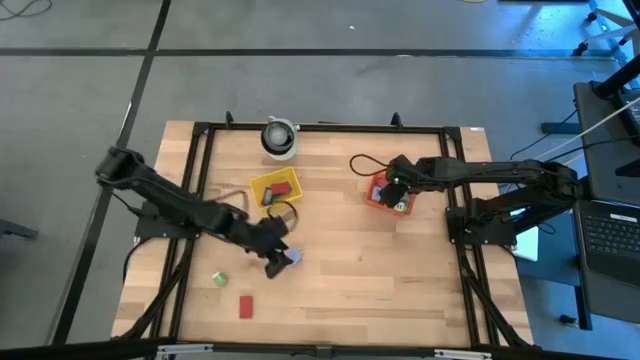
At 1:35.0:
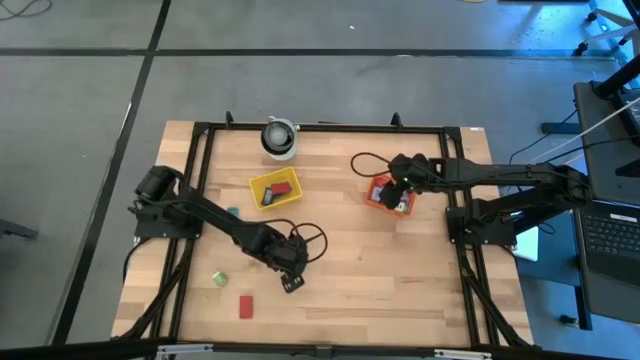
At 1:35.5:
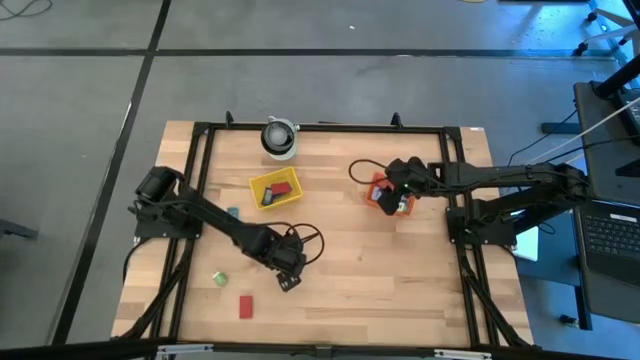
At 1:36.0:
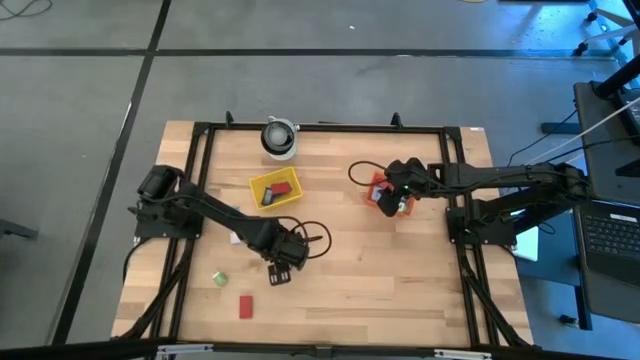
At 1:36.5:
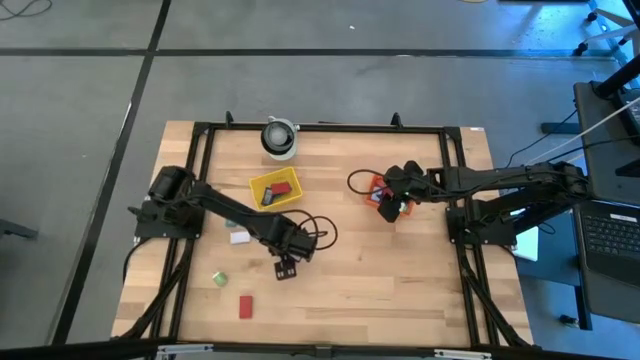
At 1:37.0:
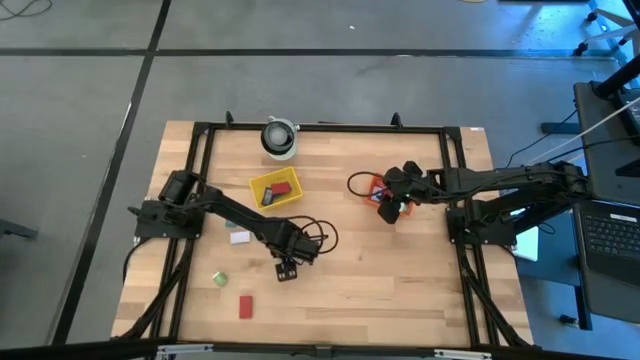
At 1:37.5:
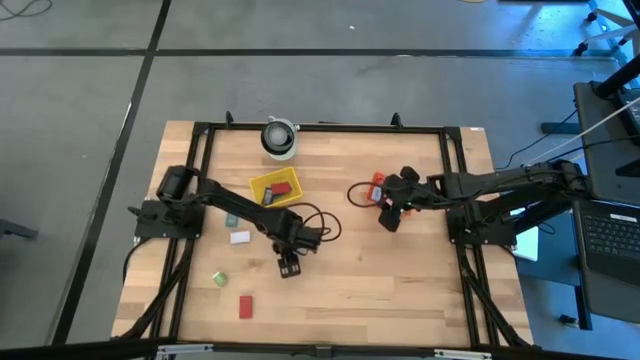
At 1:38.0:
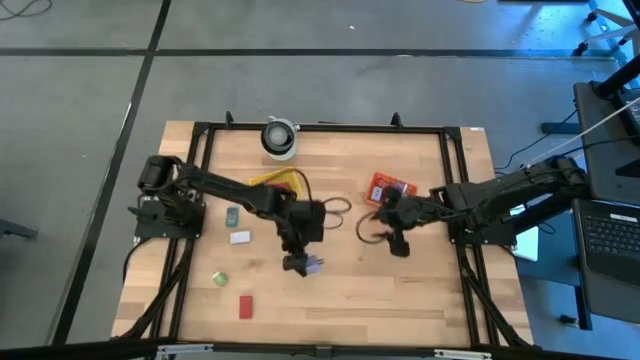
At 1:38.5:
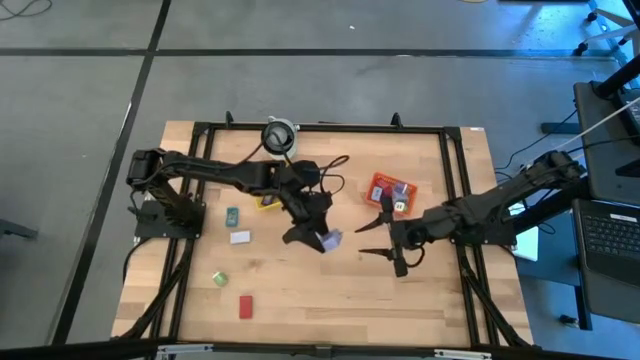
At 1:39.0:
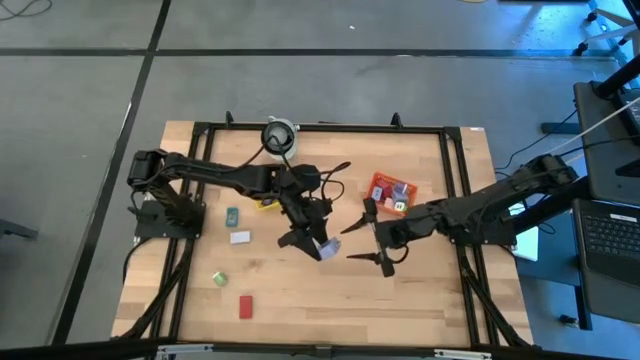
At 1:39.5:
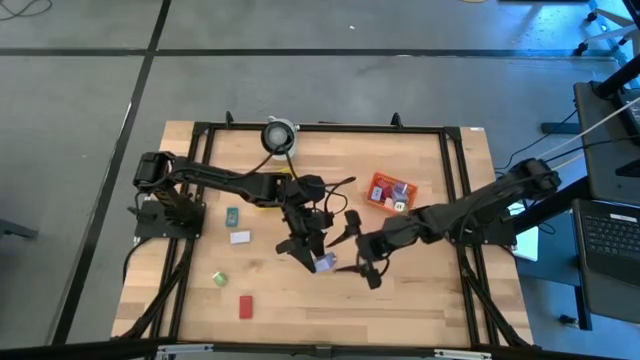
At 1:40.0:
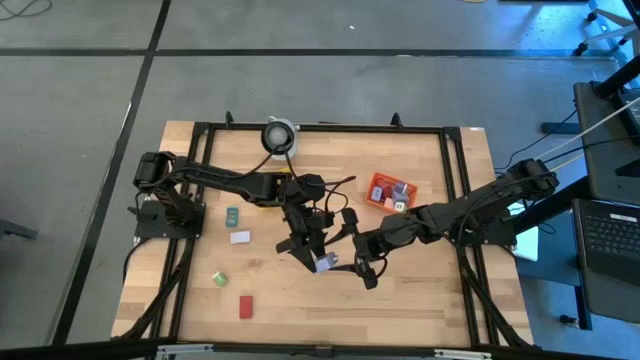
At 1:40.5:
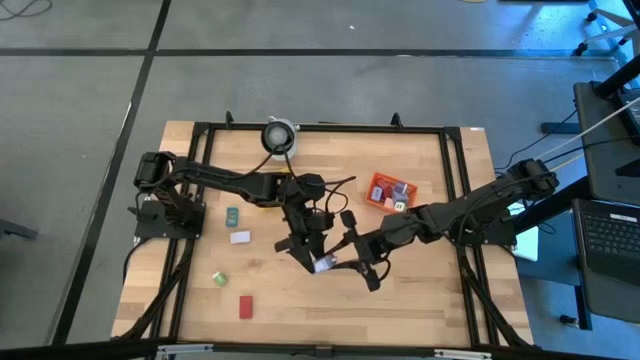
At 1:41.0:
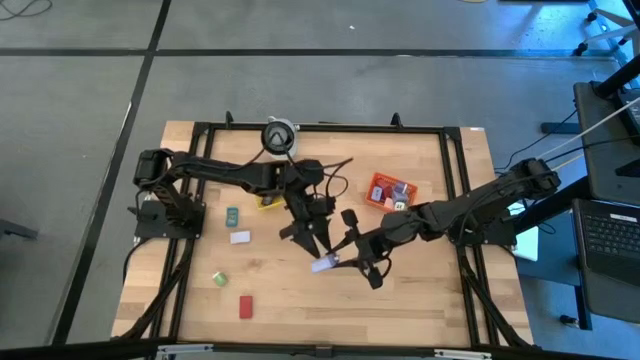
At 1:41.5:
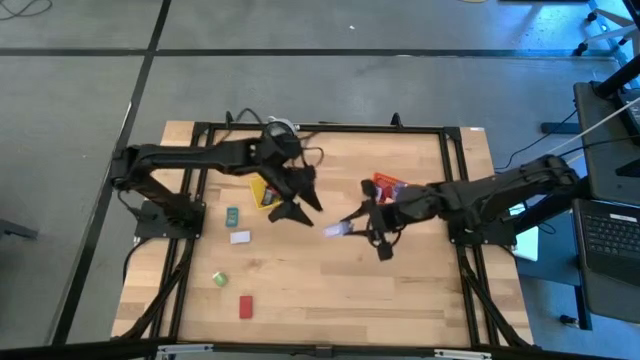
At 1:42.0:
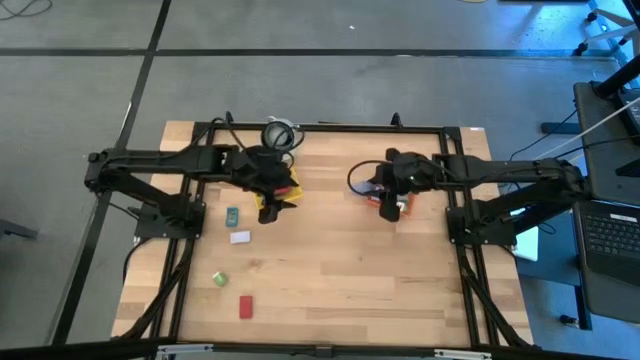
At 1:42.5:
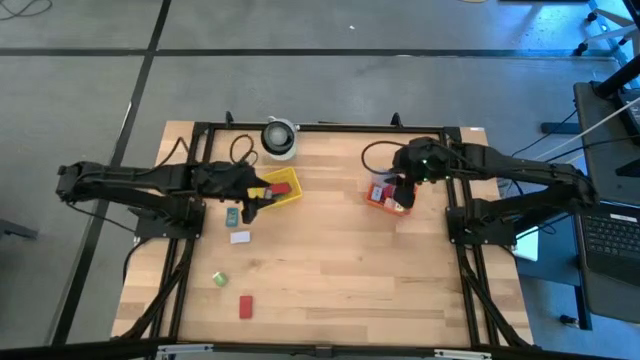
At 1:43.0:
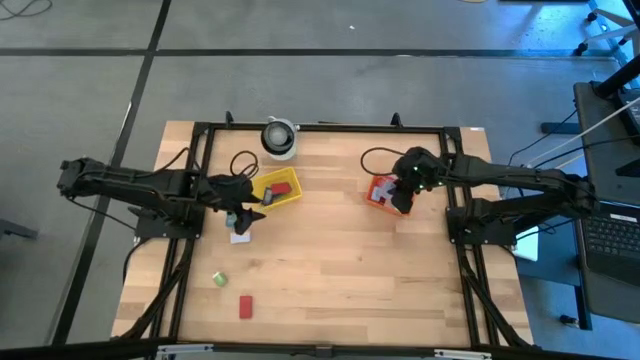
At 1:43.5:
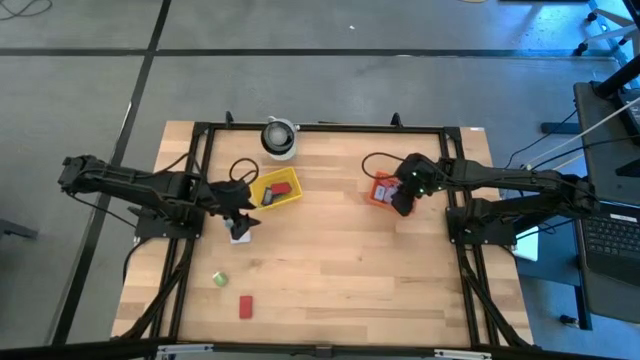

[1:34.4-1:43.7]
Task: Pick & Place Office items
Put the light blue charger adapter into the orange bin

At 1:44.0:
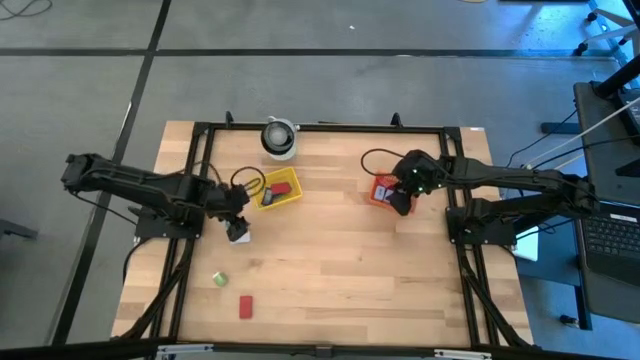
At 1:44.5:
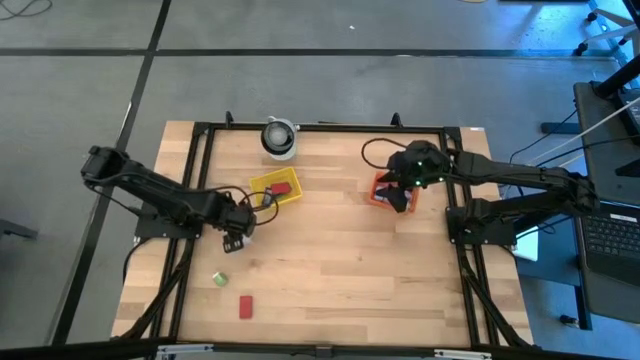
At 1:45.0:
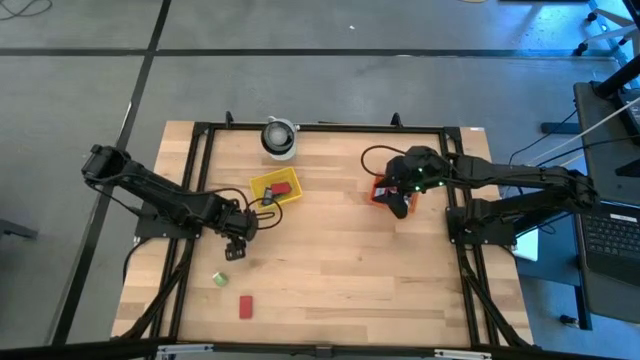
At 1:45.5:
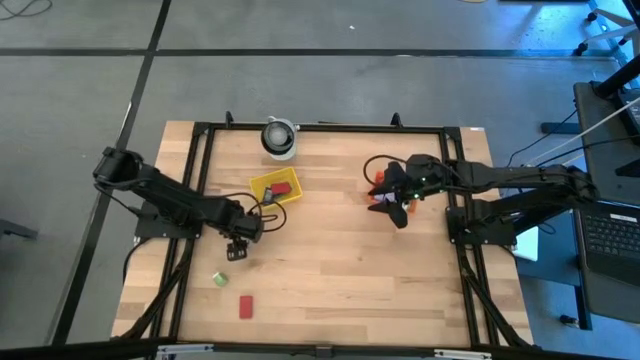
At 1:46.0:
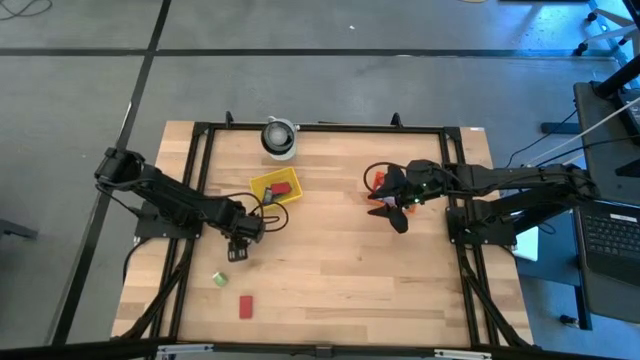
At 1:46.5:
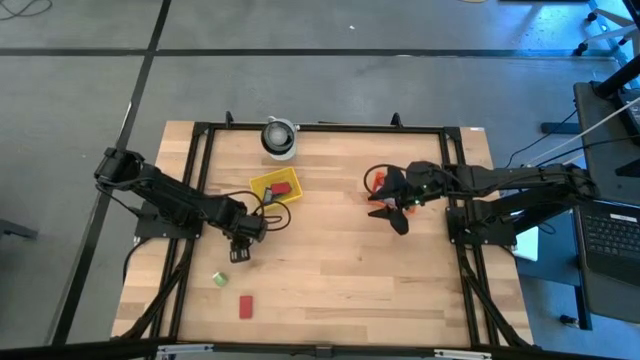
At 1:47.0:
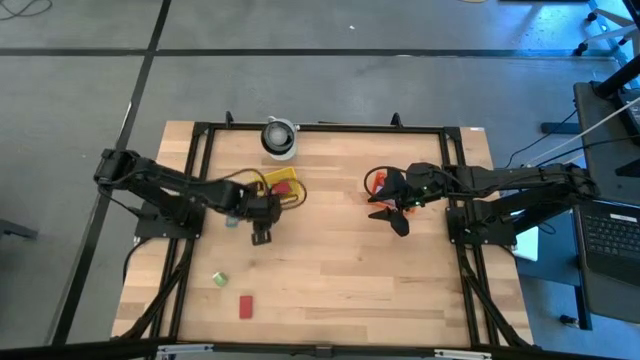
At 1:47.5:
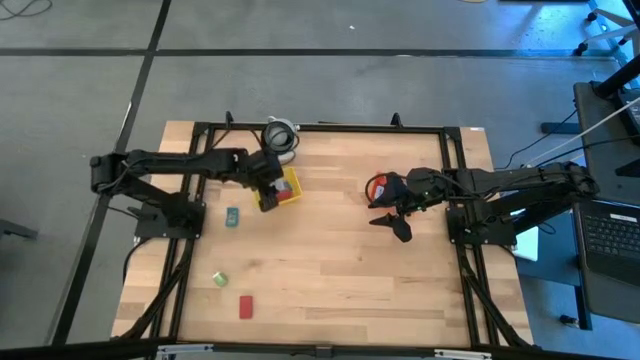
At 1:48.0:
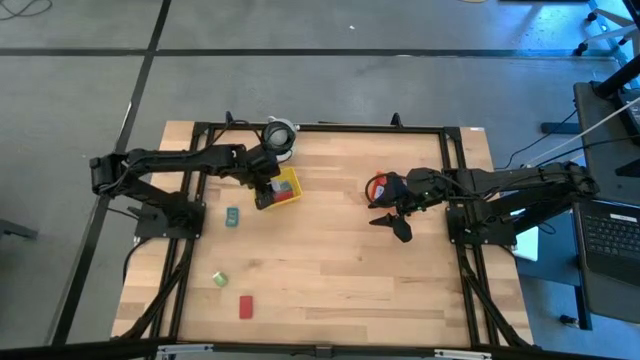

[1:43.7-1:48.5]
Put the white digital clock into the yellow bin

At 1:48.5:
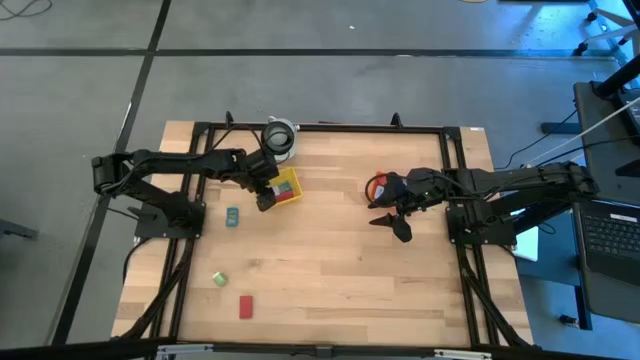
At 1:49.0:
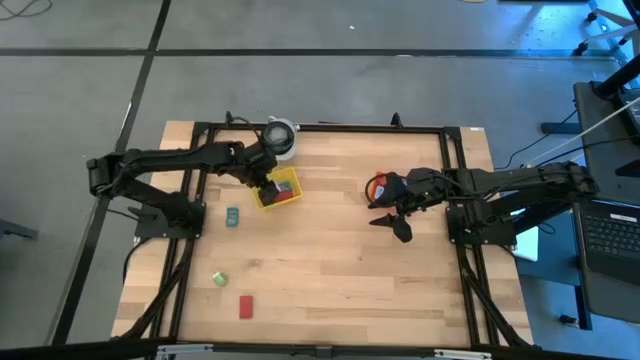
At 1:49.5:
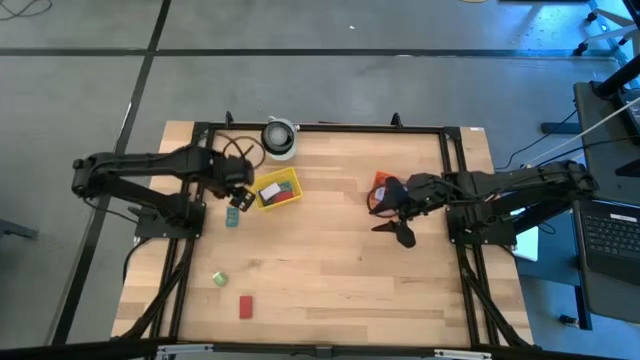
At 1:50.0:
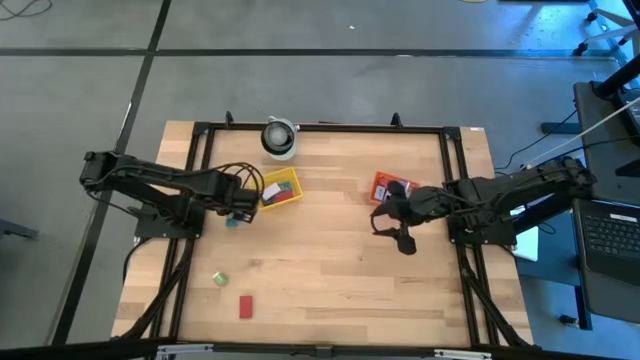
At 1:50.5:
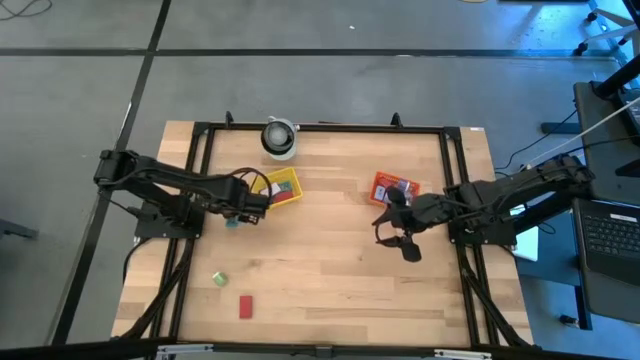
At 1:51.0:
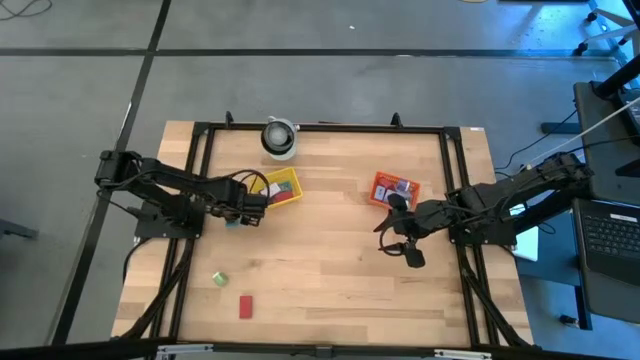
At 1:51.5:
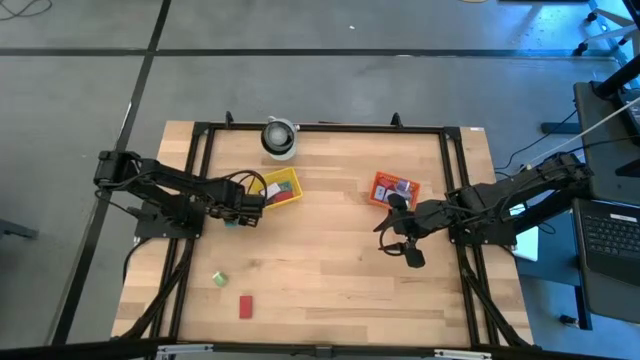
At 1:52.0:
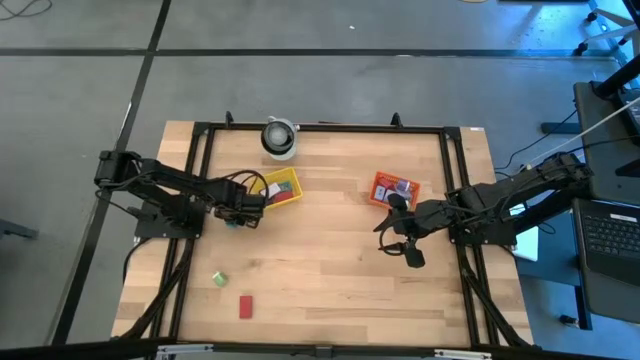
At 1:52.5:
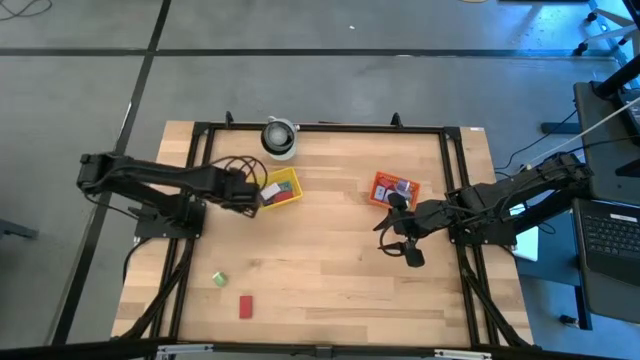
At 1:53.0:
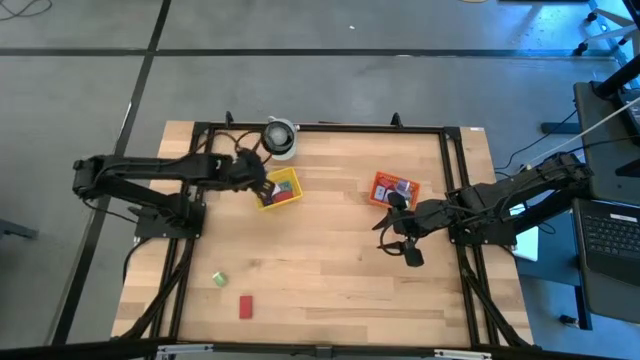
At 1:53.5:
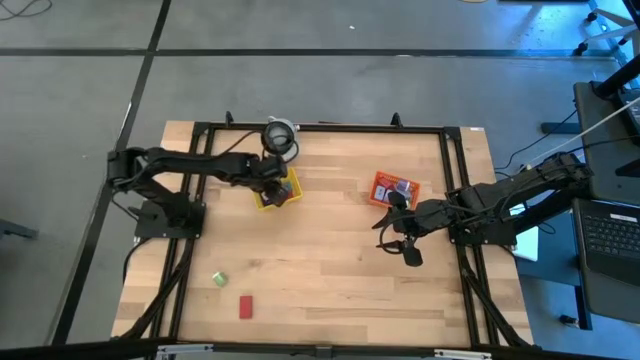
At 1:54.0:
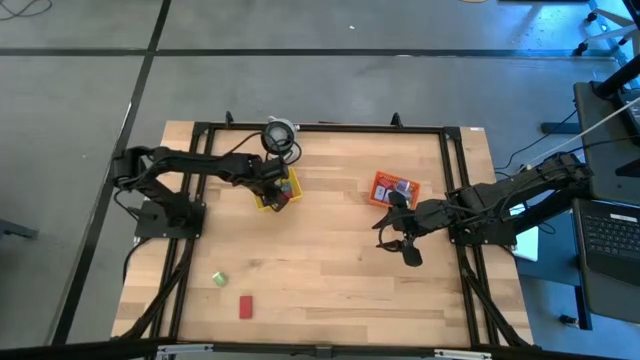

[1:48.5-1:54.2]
Put the light blue digital clock into the yellow bin
